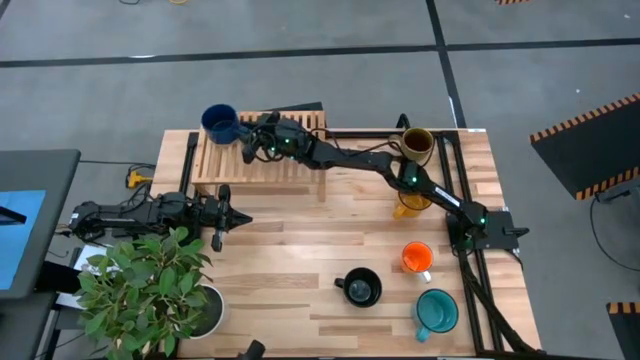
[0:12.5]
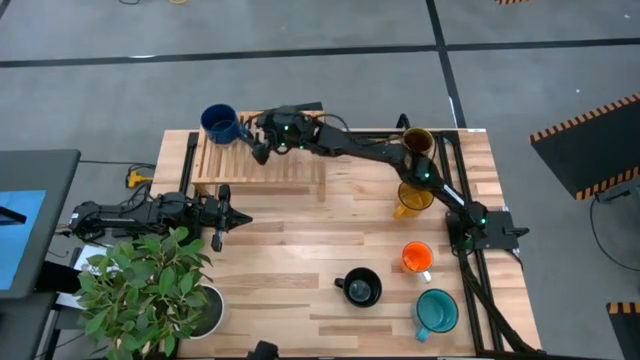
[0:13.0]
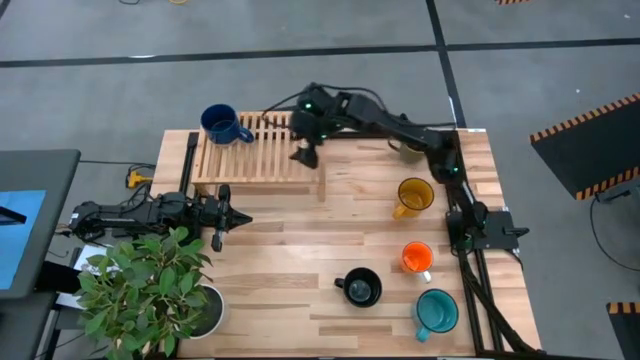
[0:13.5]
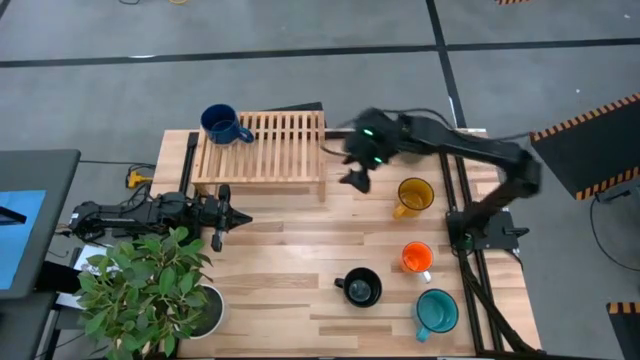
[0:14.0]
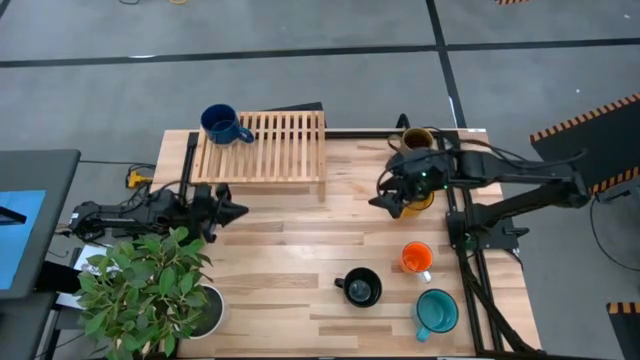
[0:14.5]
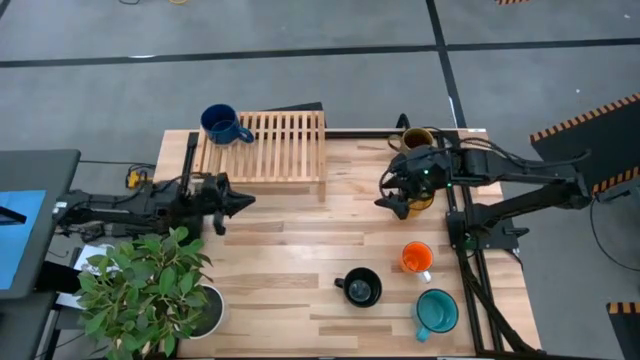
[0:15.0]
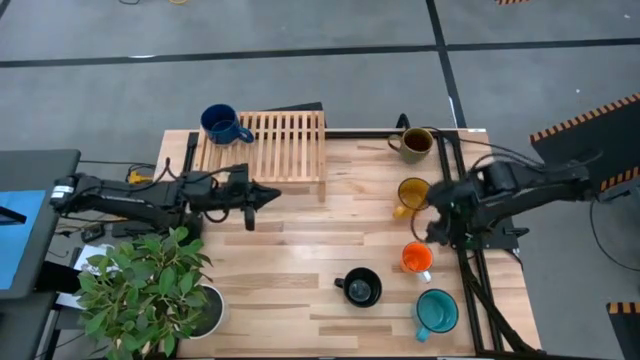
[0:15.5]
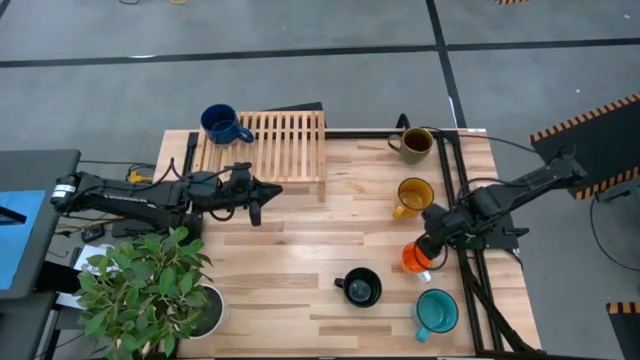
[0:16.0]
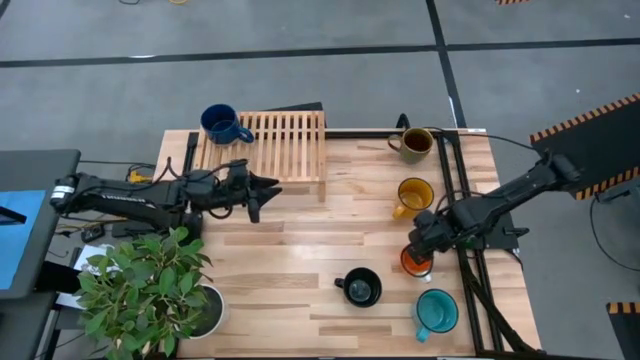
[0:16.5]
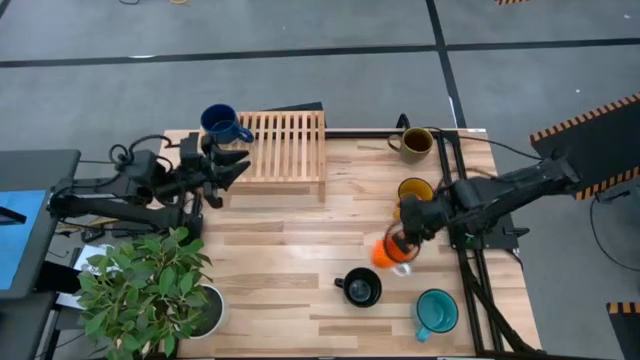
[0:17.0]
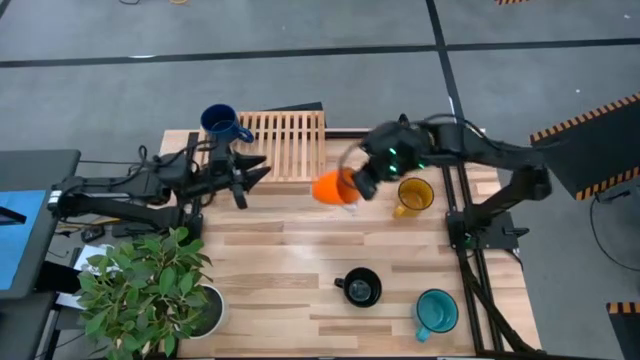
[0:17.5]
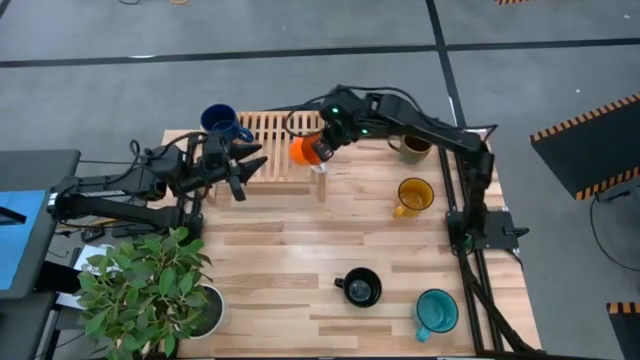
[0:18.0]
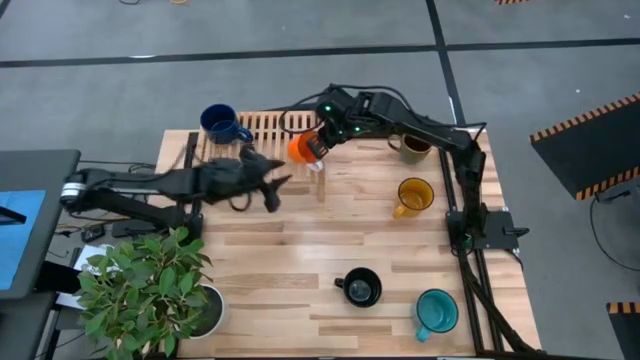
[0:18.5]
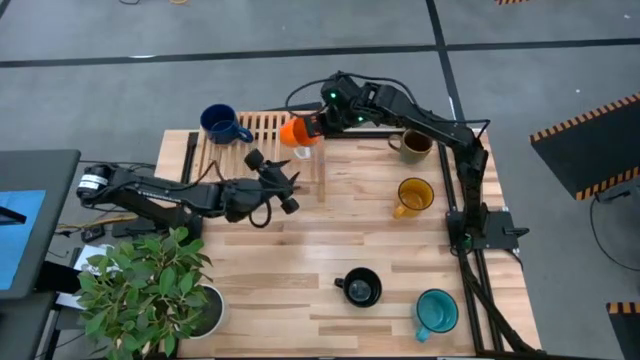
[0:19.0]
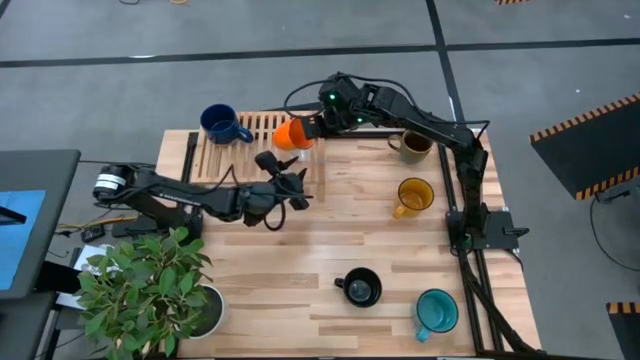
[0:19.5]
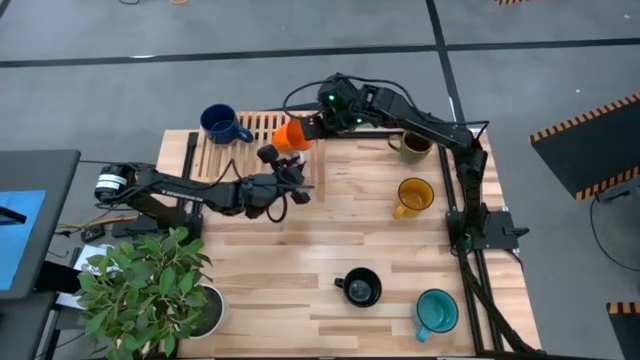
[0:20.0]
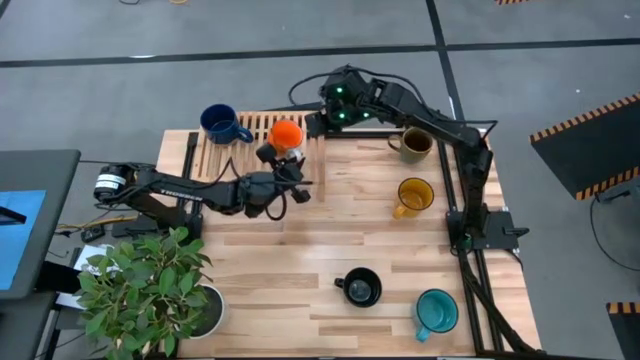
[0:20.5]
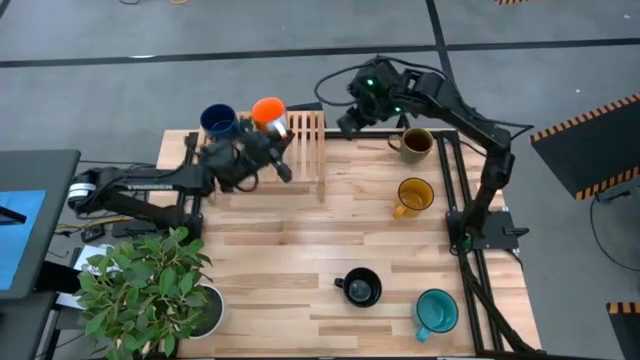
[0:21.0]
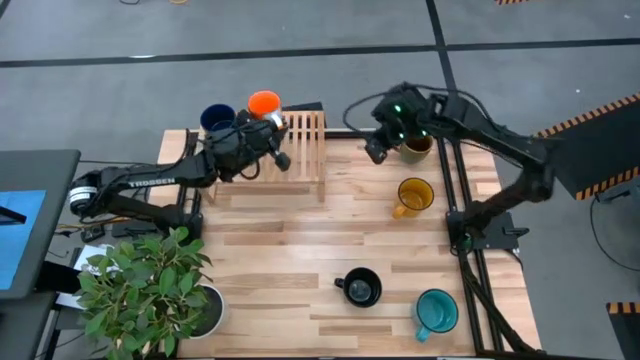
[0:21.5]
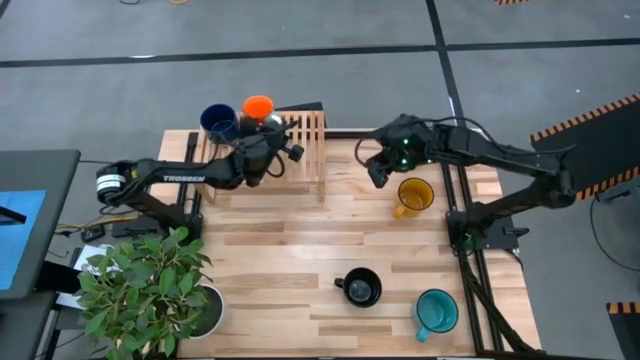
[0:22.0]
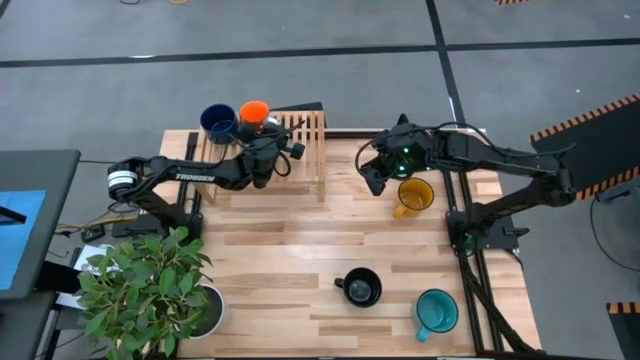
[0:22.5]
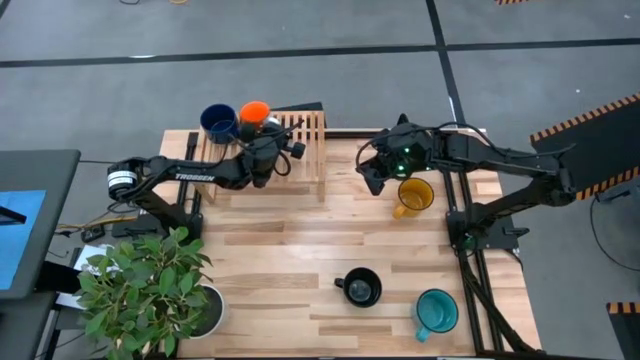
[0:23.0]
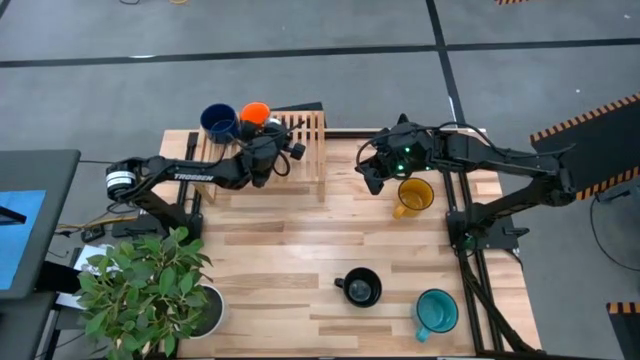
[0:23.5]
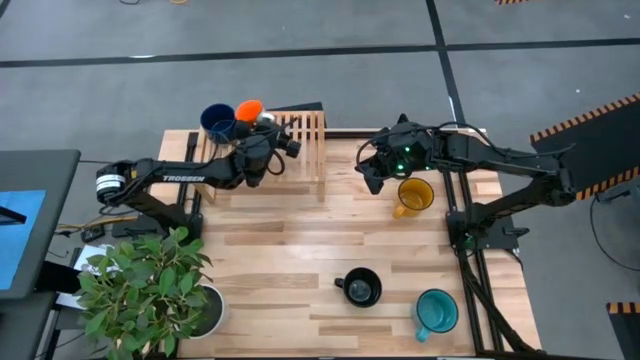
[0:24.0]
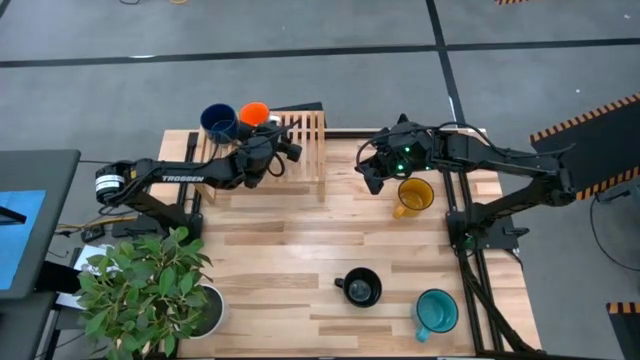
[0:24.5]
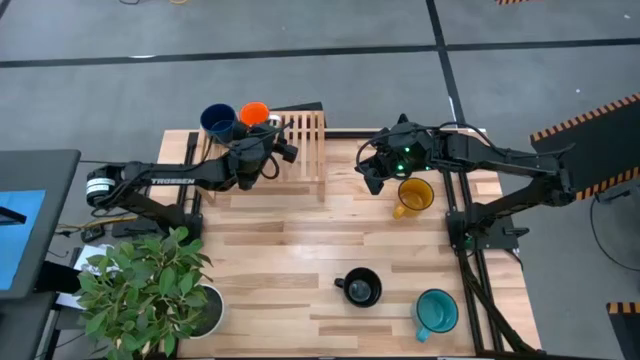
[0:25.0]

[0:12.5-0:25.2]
Task: Place coffee mugs
Put the orange mug on the shelf

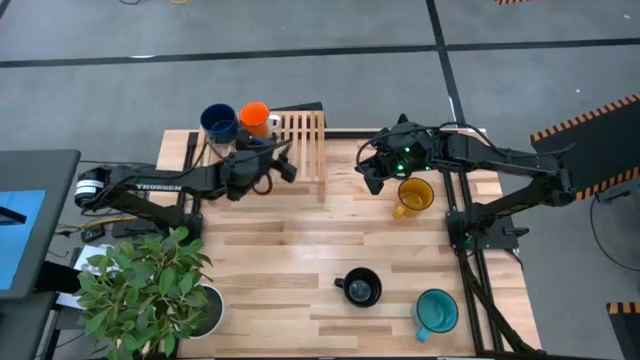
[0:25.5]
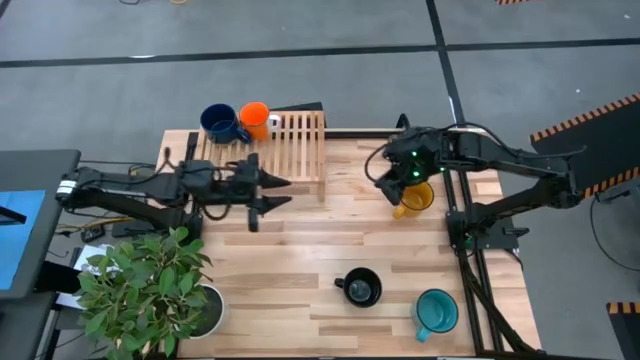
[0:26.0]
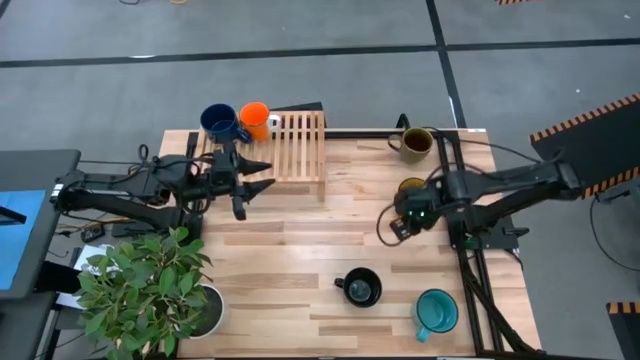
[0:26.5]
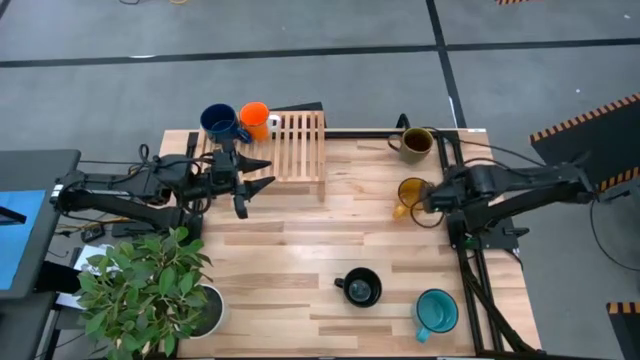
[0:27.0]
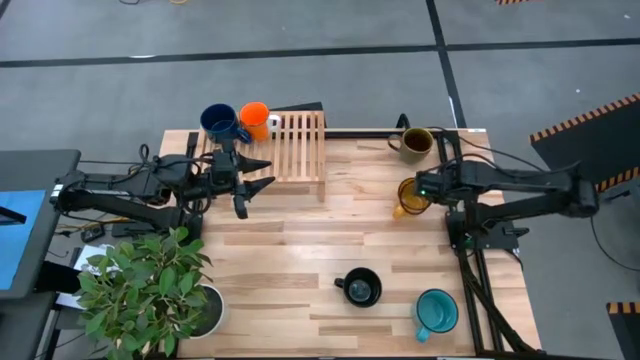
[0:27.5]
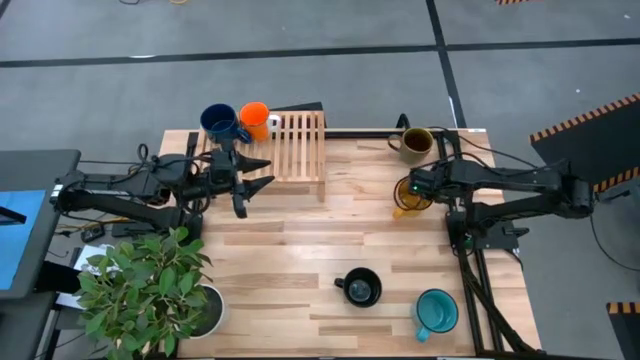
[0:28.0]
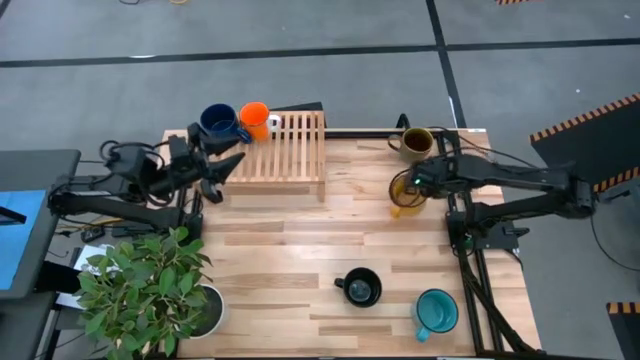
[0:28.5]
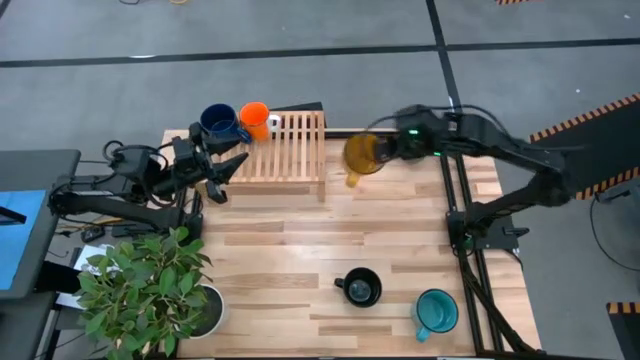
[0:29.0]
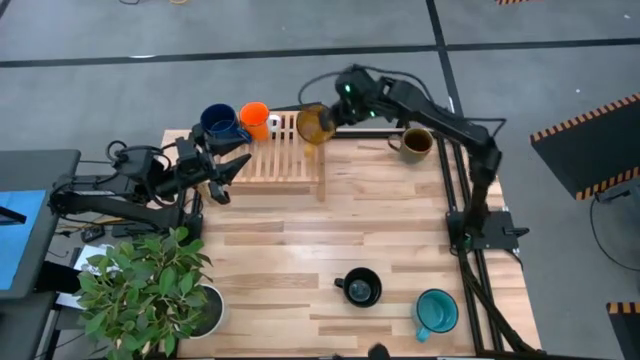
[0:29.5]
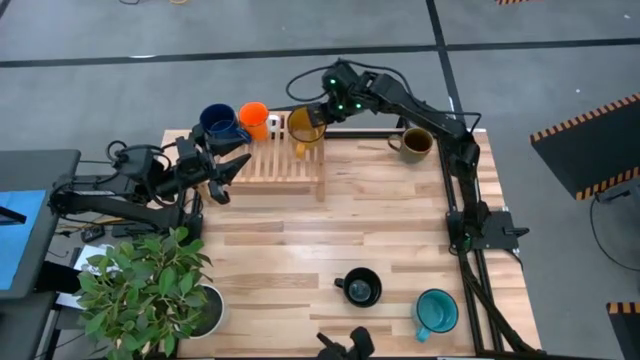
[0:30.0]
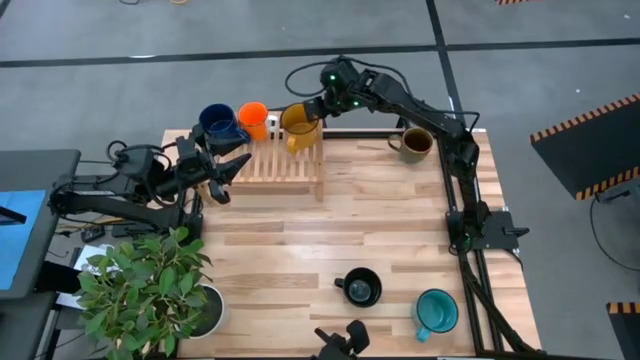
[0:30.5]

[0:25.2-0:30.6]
Put the yellow mug on the shelf

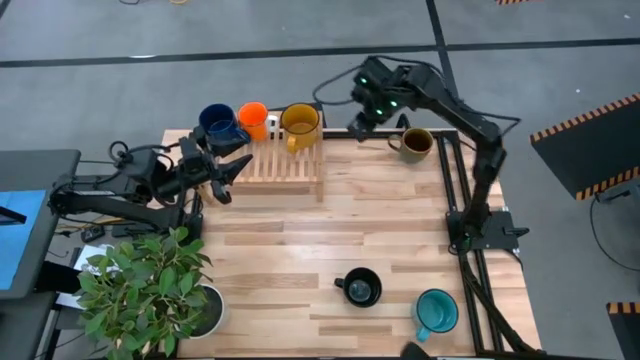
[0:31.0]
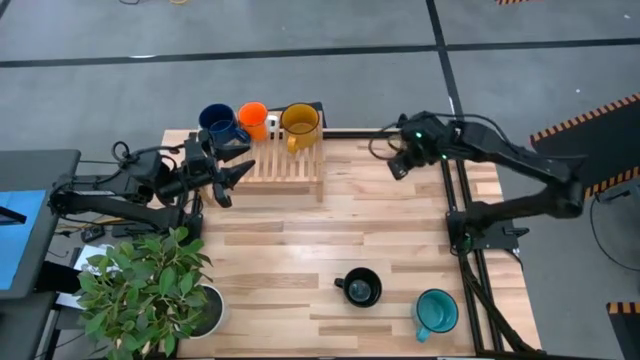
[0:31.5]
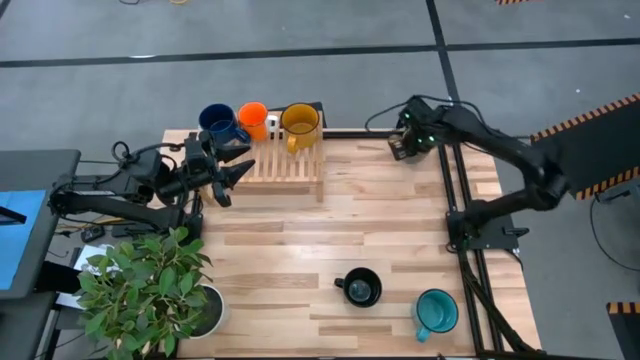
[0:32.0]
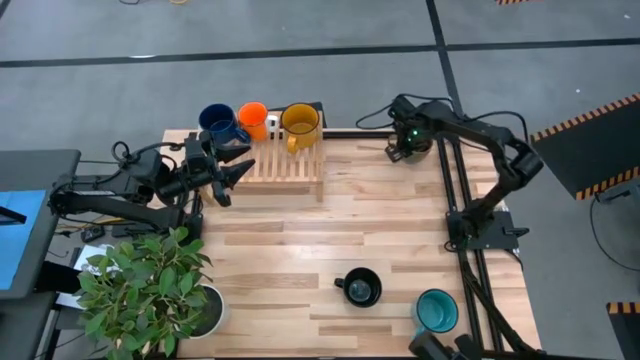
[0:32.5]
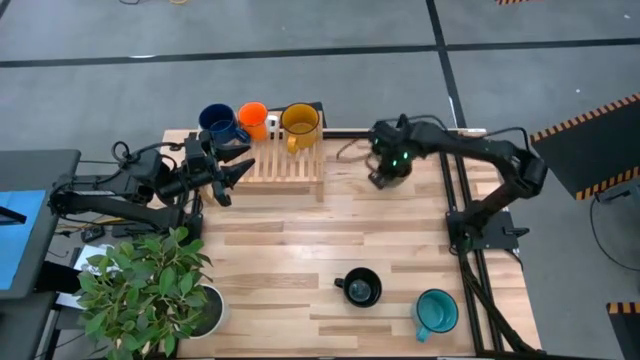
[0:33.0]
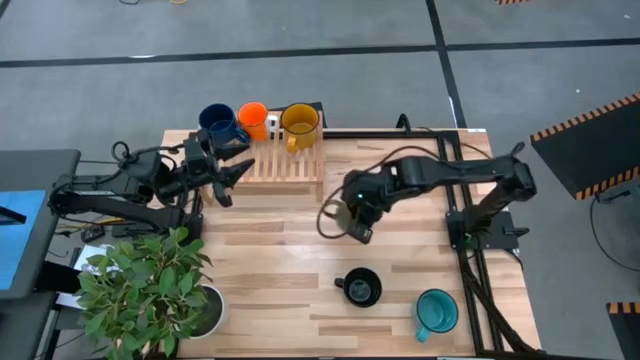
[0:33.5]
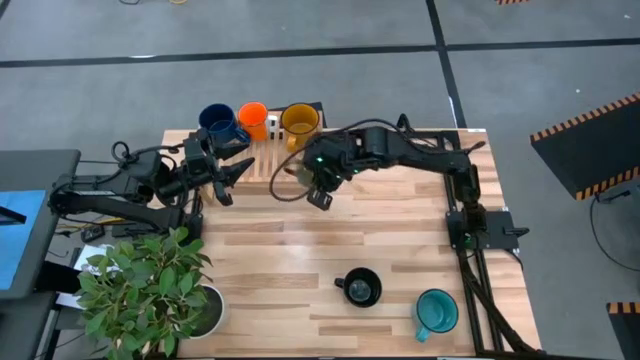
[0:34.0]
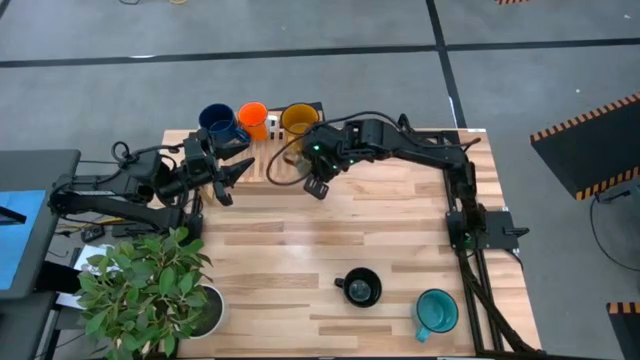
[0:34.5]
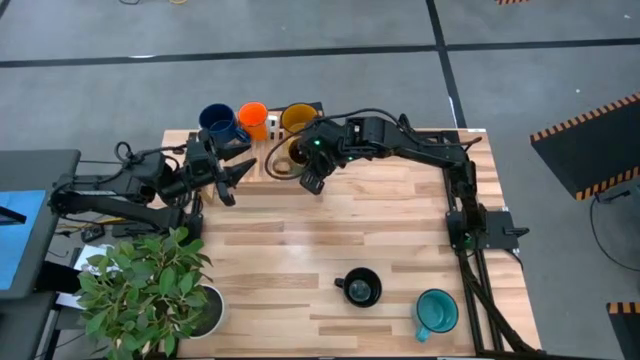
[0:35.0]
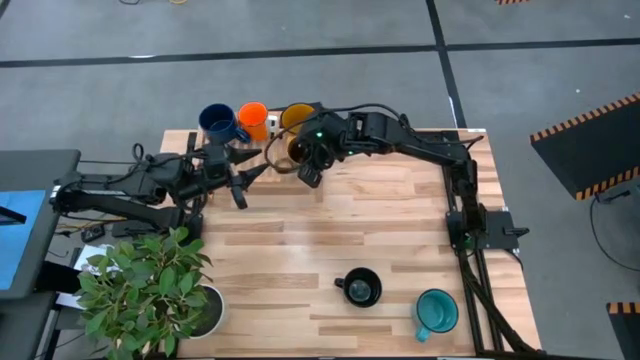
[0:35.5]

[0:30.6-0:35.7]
Put the brown mug on the shelf
